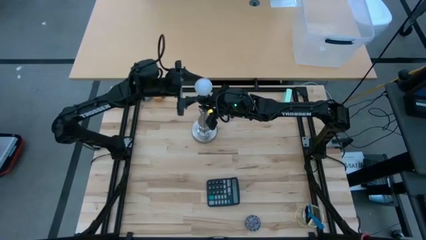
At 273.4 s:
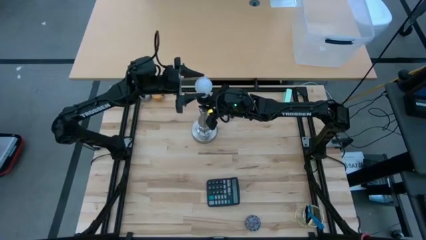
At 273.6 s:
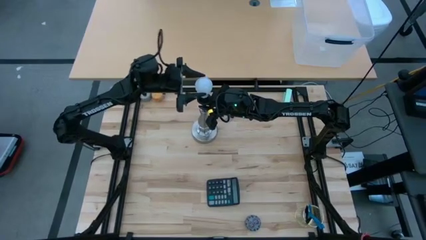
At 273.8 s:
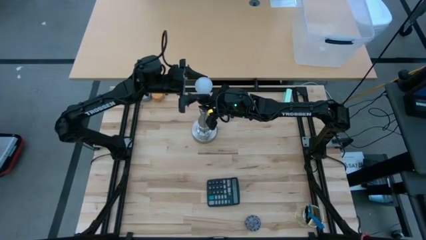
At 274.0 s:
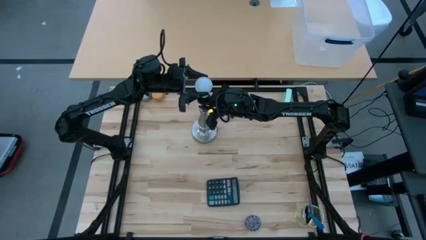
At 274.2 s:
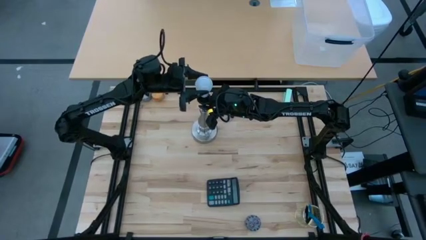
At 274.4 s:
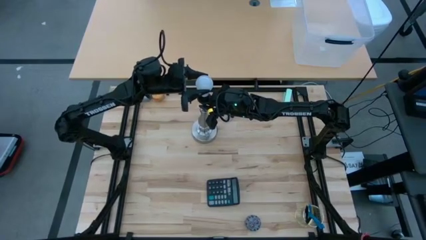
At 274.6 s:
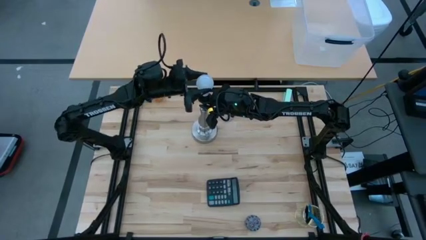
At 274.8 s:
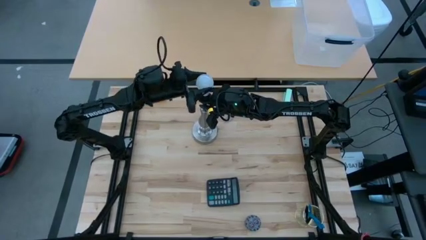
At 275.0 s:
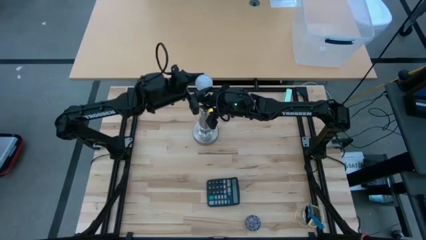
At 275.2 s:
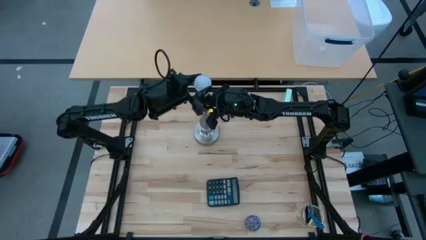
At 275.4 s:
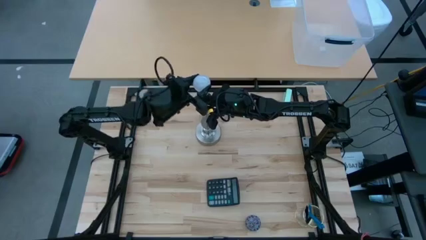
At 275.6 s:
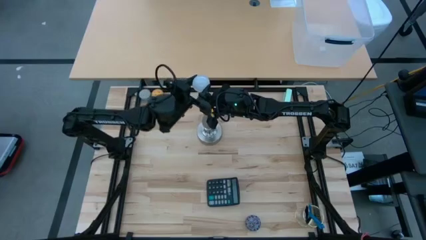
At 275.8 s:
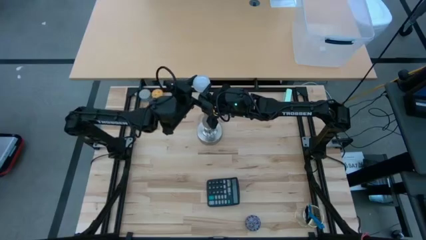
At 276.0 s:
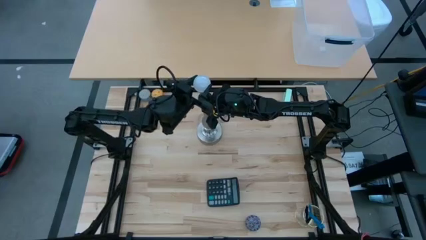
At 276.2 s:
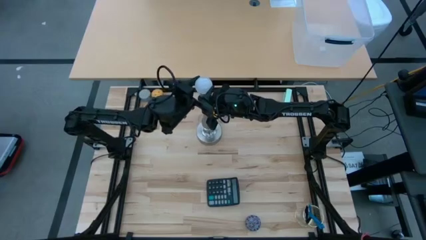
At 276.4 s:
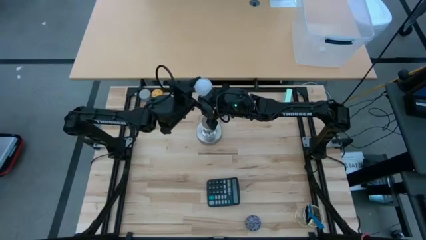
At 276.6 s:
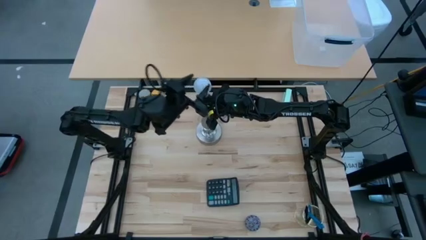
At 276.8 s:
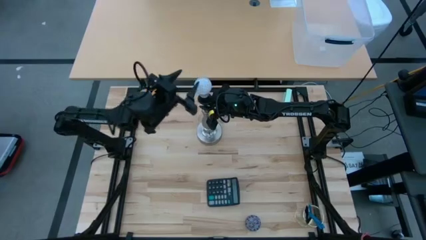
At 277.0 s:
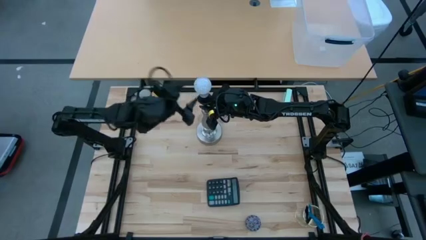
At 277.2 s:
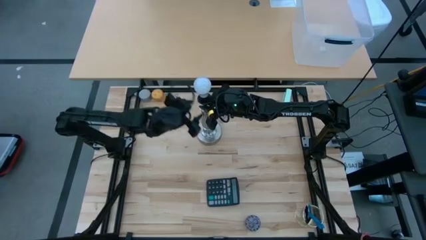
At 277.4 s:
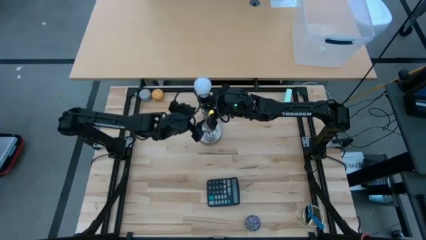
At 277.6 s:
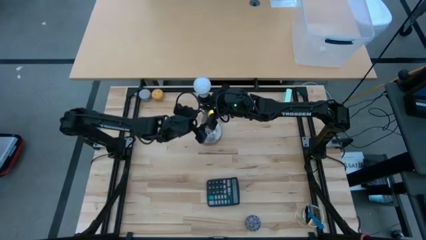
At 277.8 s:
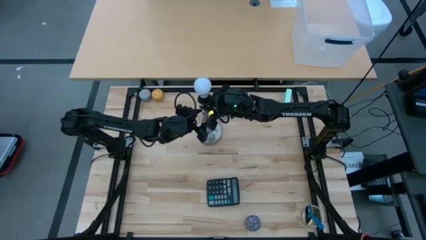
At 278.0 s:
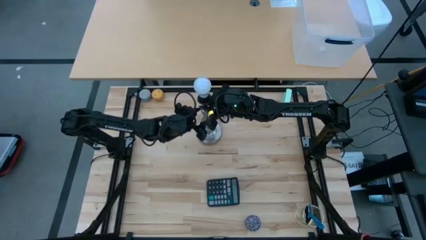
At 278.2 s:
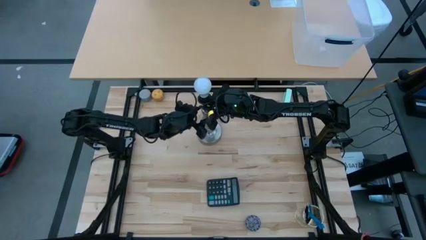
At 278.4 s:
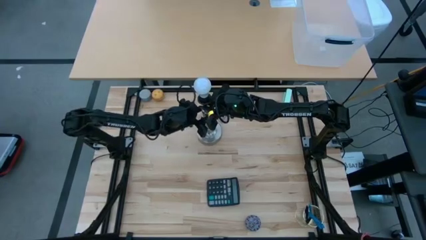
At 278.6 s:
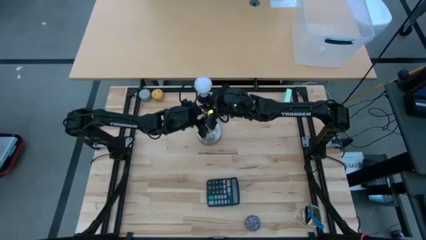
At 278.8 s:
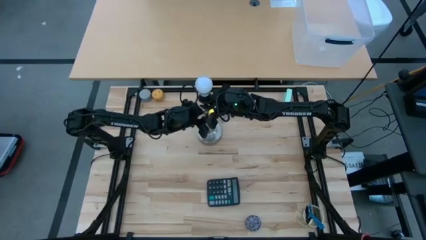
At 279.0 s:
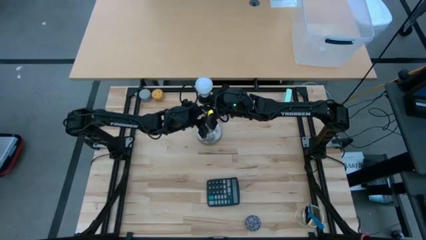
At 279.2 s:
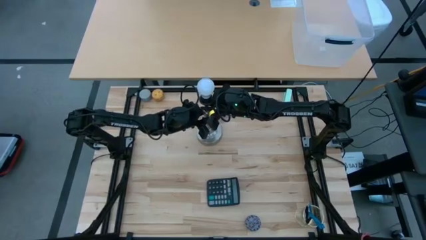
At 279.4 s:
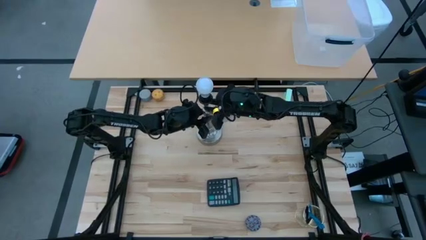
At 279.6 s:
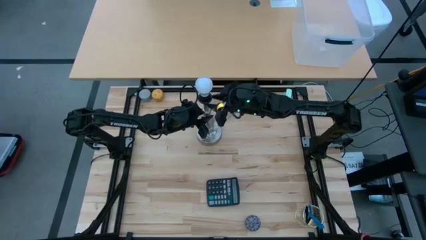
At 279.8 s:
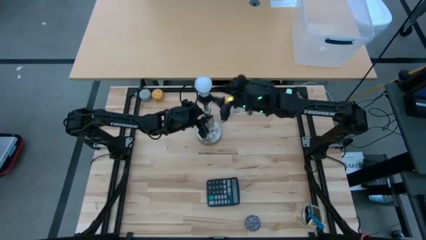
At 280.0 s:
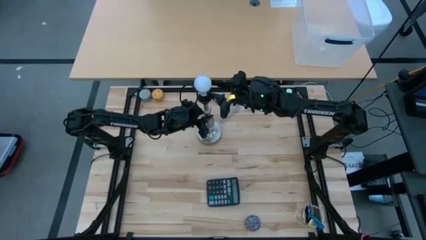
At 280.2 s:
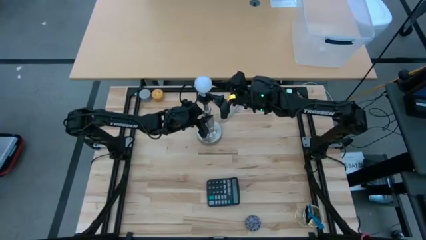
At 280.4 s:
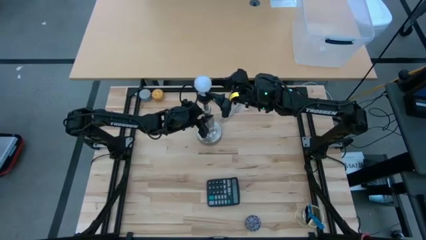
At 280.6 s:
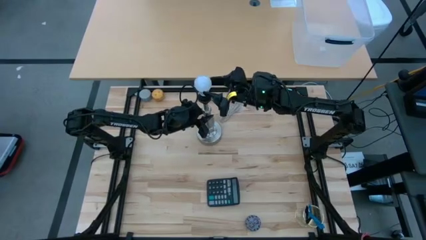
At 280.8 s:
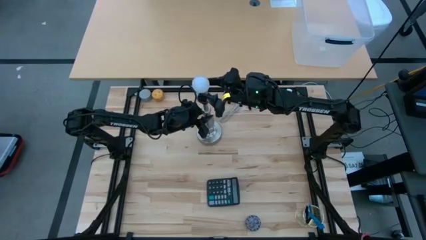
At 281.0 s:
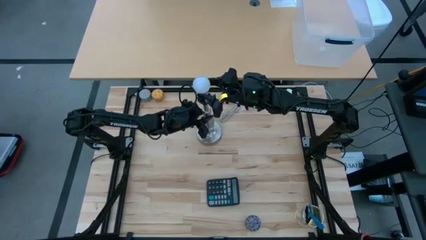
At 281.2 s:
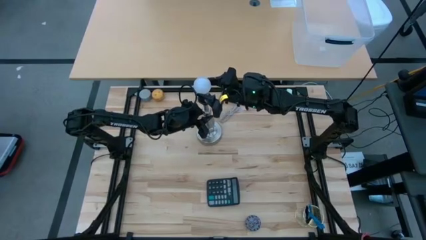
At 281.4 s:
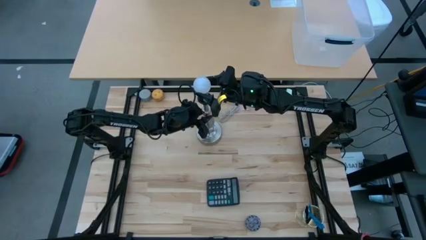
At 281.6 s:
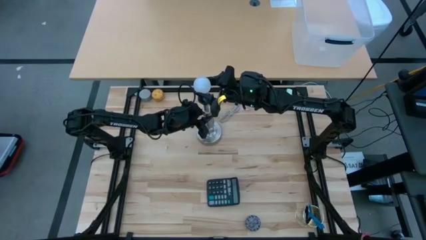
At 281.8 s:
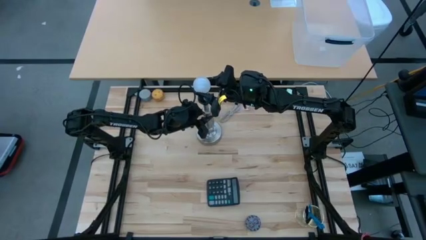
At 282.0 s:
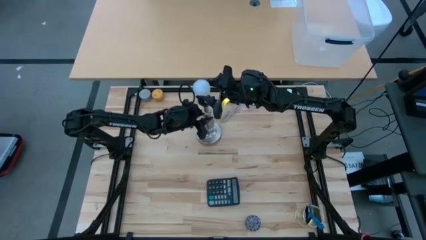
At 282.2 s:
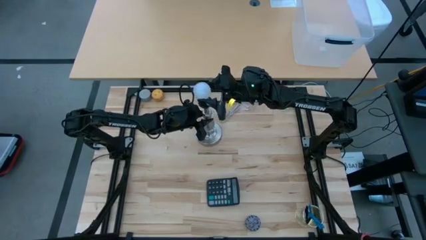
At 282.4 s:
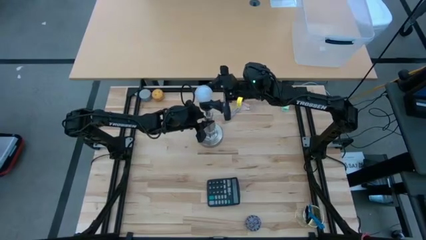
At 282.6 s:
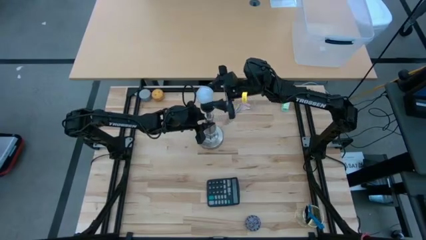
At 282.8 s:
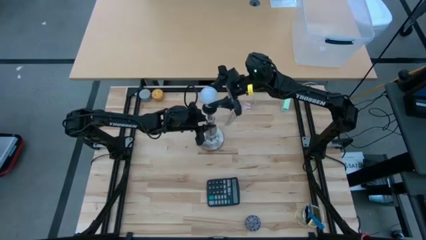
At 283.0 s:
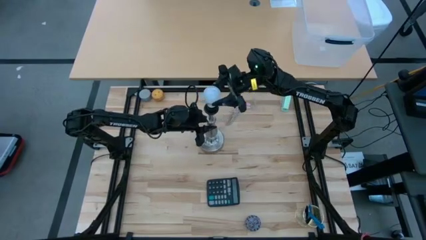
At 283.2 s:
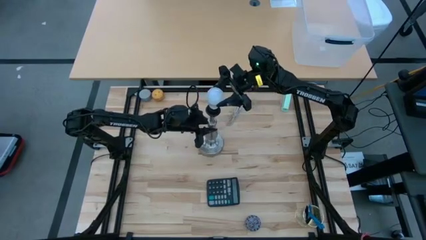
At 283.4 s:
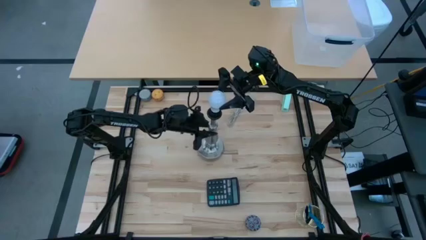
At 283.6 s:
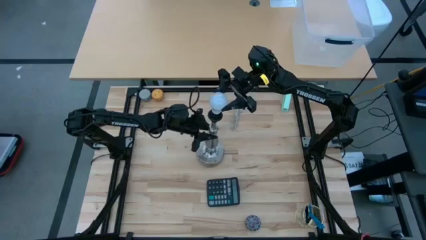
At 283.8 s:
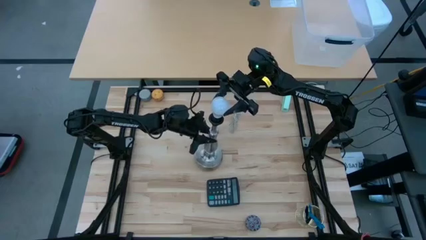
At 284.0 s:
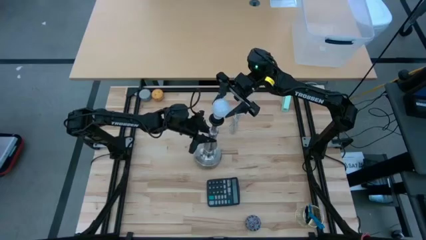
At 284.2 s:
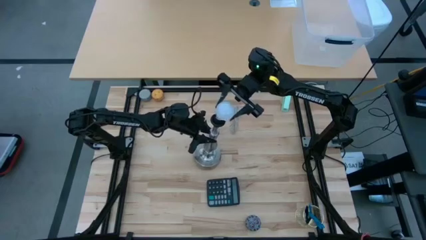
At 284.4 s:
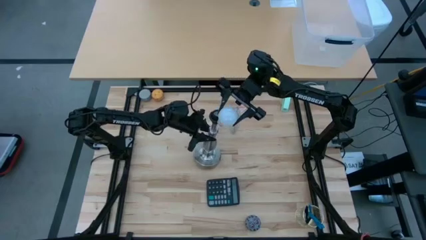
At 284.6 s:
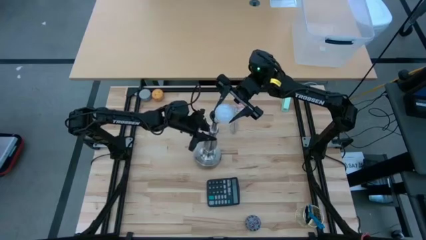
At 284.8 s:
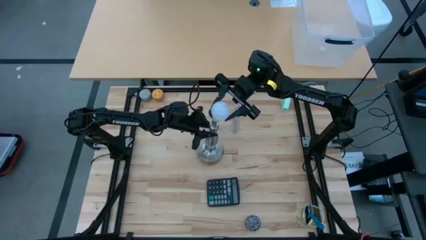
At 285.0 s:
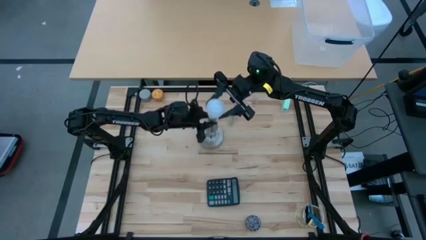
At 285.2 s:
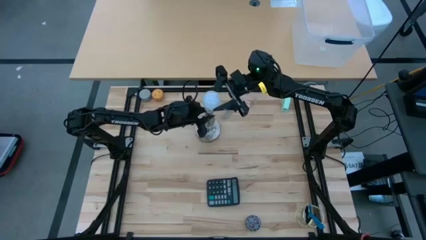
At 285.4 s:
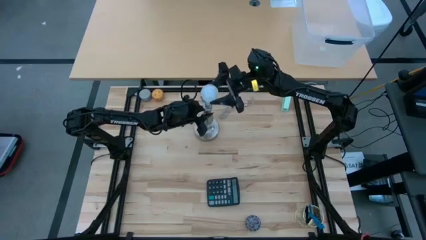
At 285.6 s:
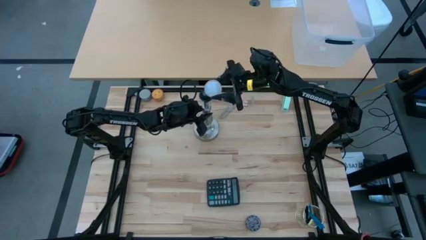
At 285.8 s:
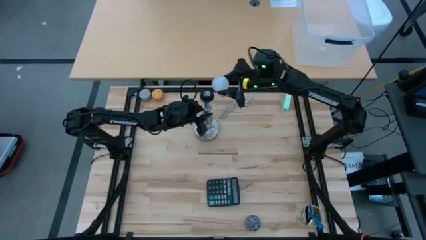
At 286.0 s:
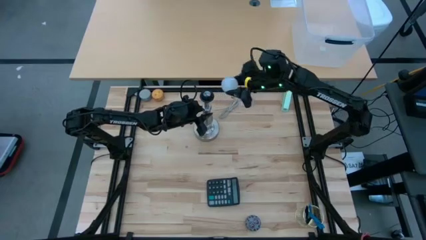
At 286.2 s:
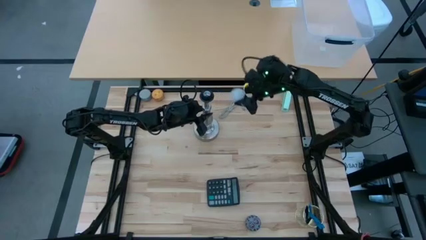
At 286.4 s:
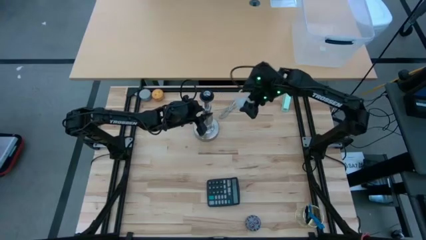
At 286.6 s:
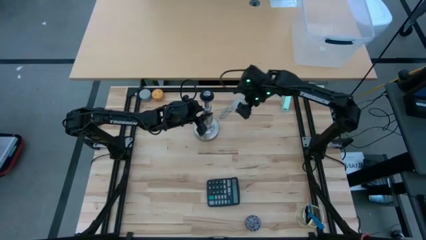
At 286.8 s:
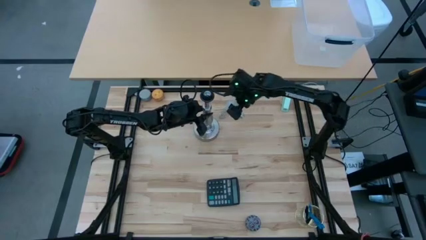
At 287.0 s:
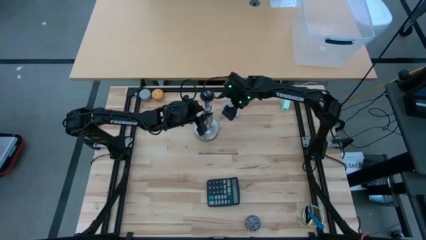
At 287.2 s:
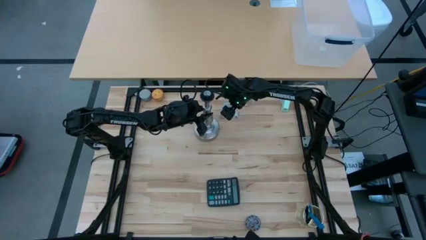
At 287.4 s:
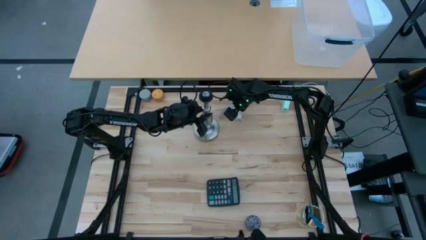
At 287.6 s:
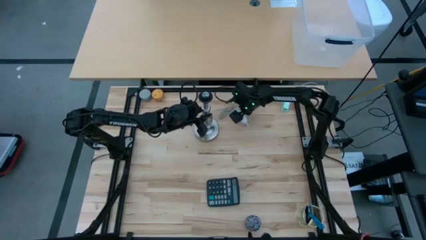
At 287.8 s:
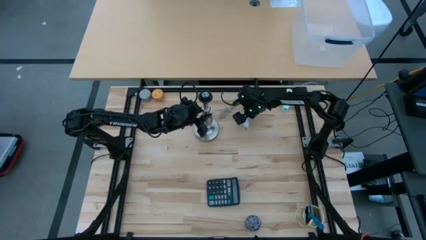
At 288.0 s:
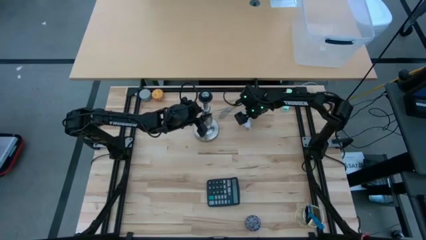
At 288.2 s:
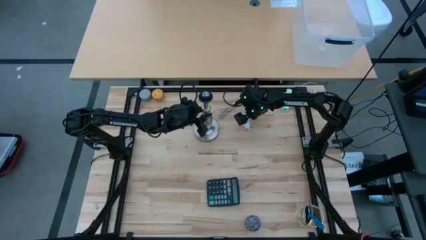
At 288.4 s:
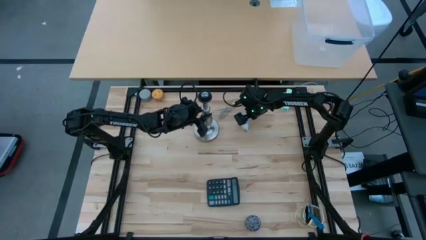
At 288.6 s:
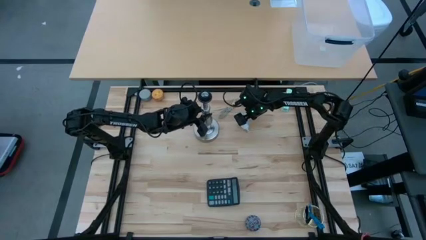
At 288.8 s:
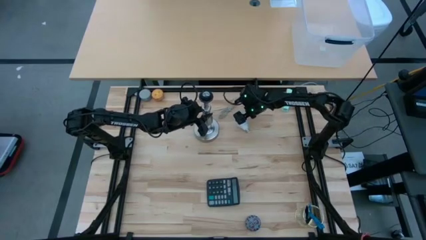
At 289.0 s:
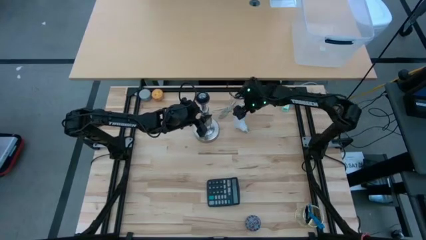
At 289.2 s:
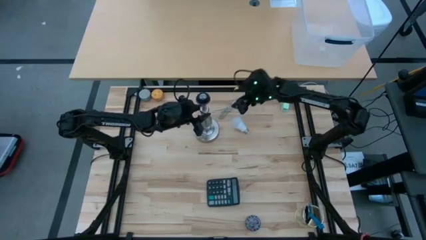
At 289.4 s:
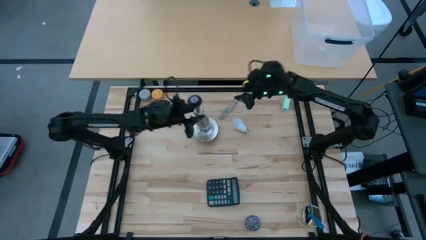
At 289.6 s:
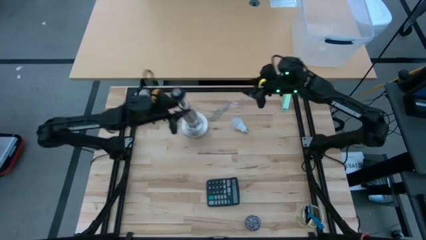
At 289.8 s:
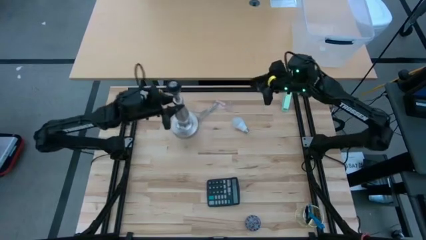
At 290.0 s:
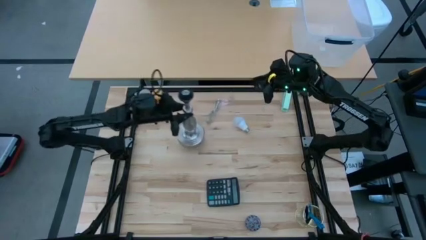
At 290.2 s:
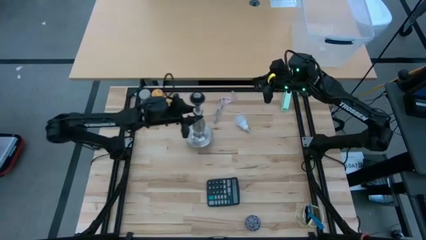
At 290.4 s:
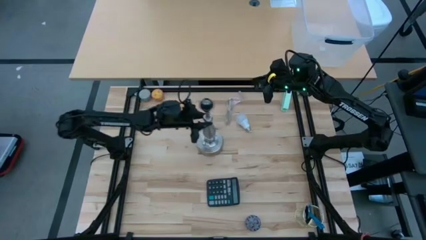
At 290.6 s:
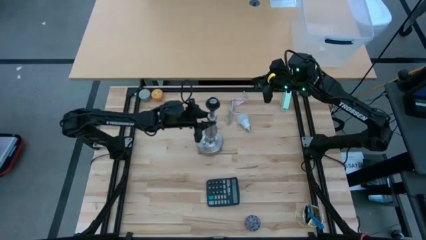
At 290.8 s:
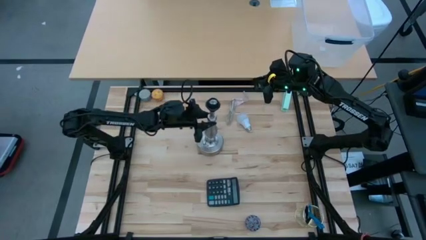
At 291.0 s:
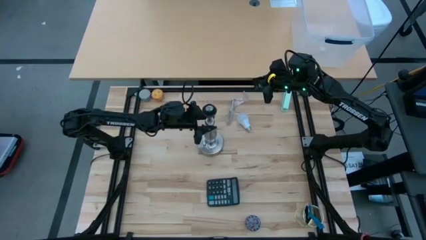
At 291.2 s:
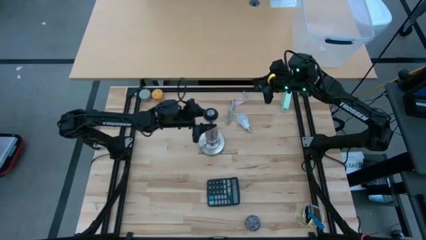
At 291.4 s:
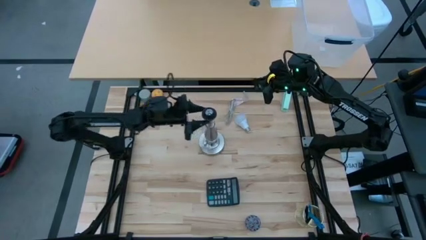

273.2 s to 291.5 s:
Task: Screw lightbulb
Remove the light bulb from the lamp
